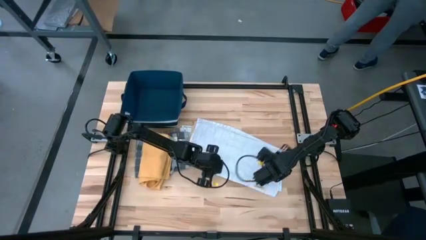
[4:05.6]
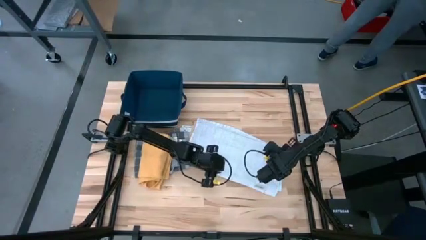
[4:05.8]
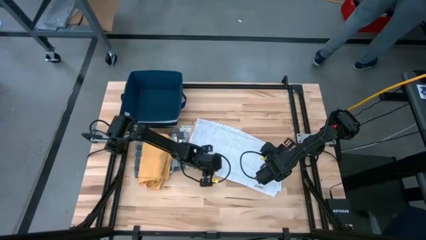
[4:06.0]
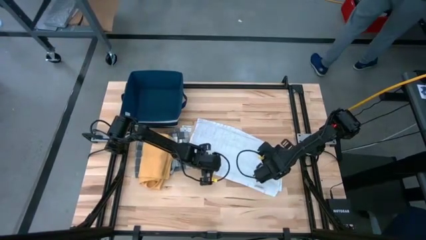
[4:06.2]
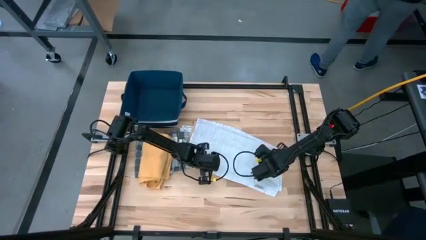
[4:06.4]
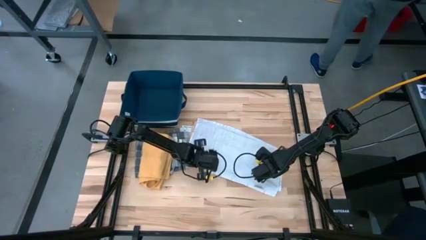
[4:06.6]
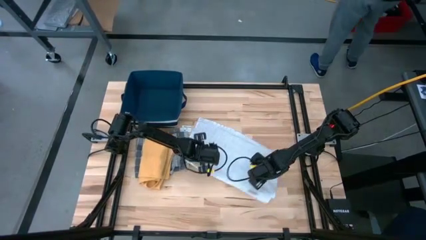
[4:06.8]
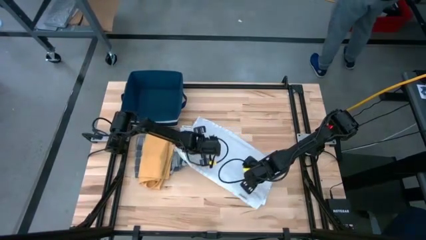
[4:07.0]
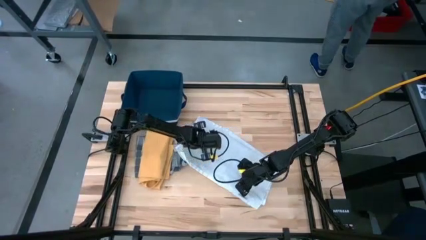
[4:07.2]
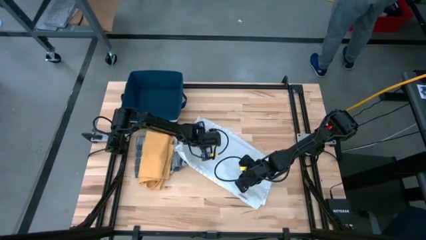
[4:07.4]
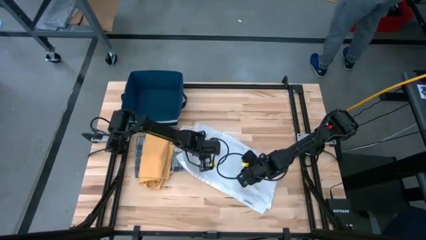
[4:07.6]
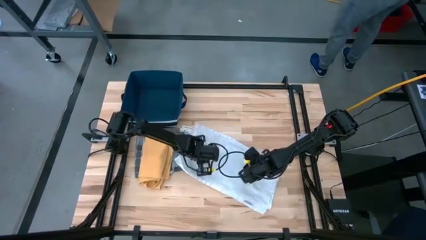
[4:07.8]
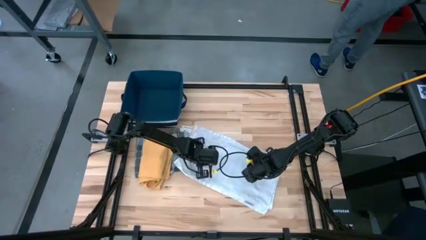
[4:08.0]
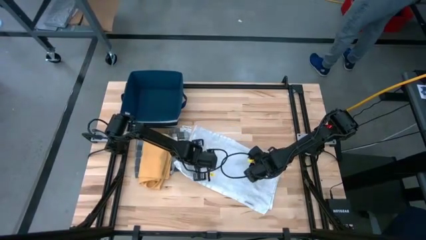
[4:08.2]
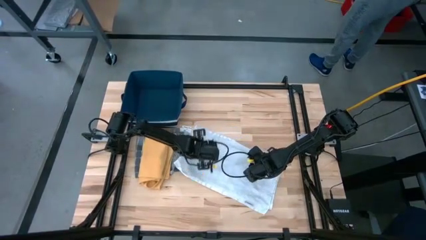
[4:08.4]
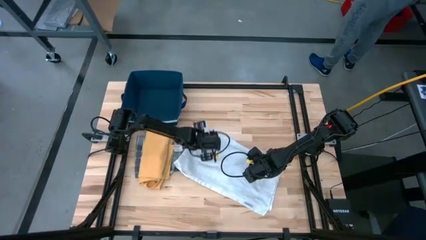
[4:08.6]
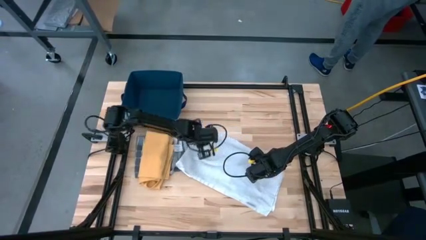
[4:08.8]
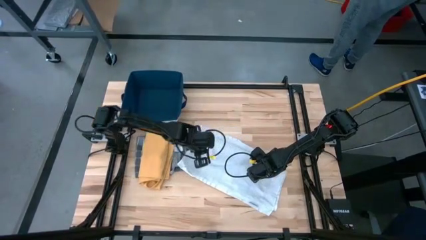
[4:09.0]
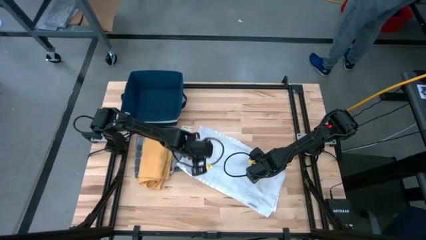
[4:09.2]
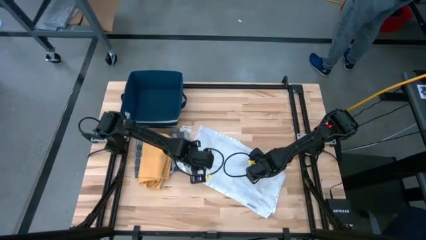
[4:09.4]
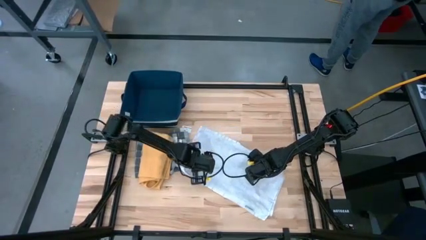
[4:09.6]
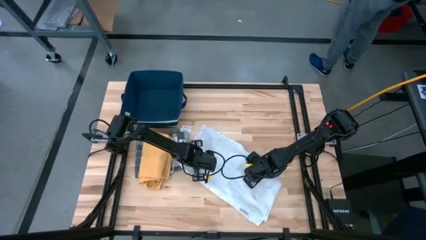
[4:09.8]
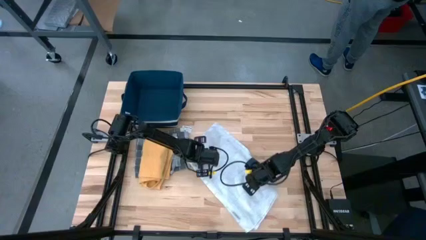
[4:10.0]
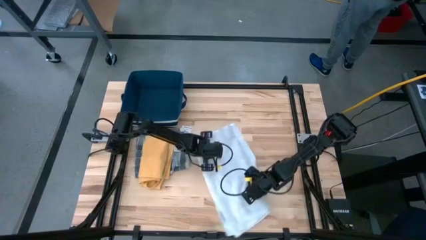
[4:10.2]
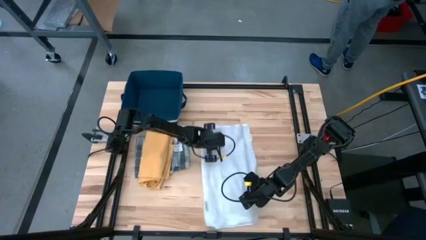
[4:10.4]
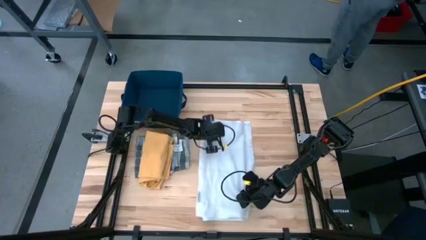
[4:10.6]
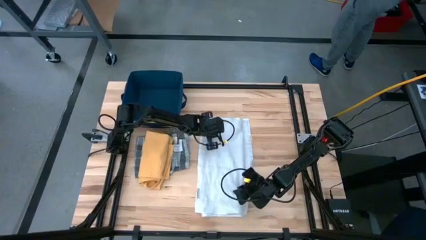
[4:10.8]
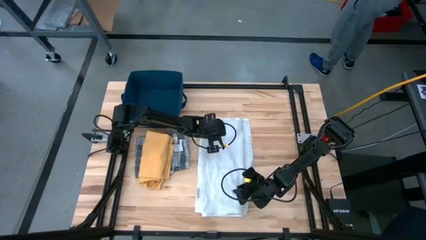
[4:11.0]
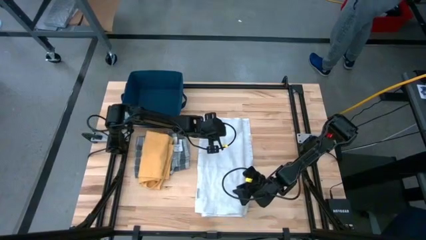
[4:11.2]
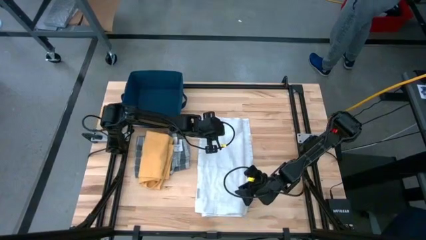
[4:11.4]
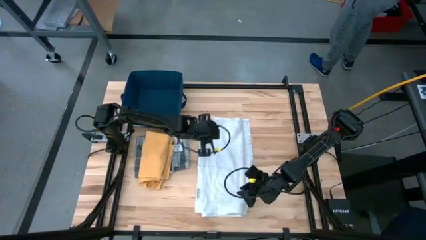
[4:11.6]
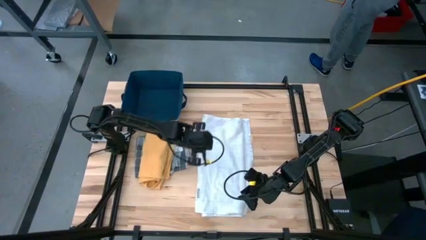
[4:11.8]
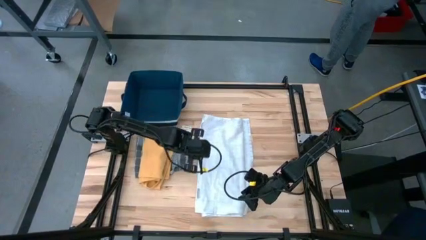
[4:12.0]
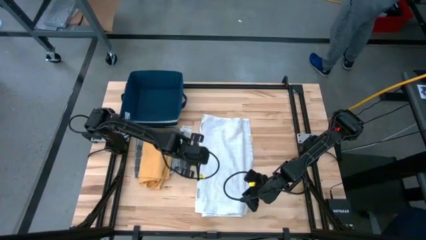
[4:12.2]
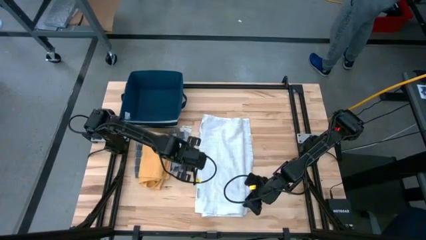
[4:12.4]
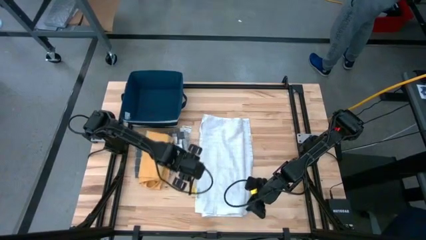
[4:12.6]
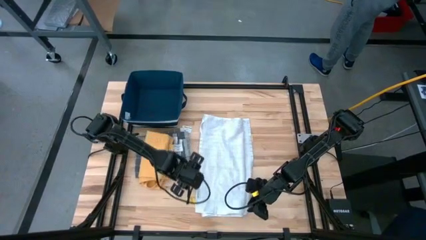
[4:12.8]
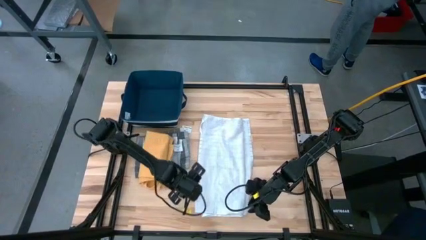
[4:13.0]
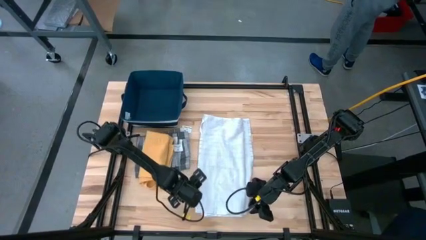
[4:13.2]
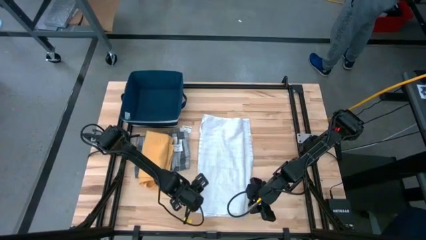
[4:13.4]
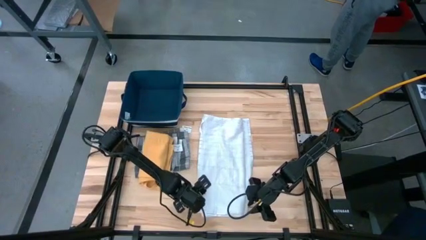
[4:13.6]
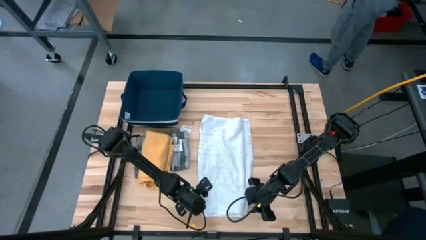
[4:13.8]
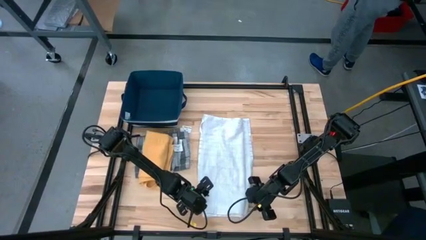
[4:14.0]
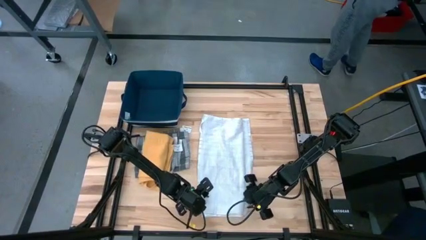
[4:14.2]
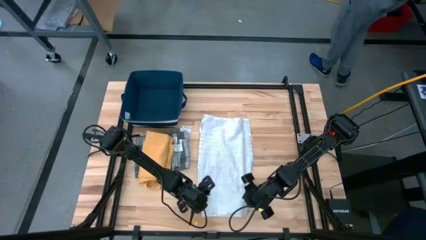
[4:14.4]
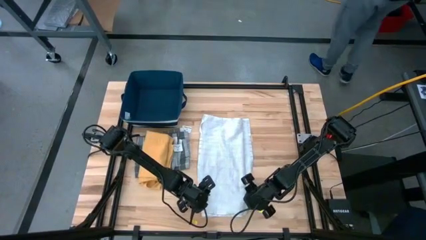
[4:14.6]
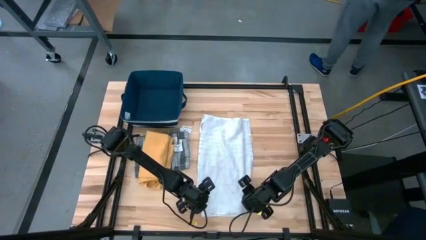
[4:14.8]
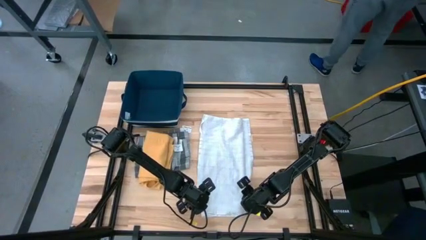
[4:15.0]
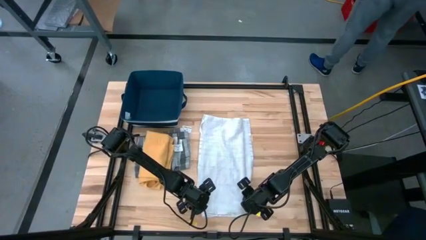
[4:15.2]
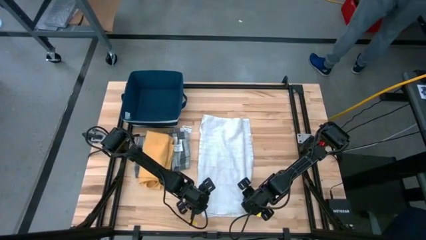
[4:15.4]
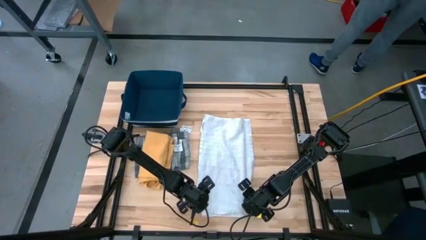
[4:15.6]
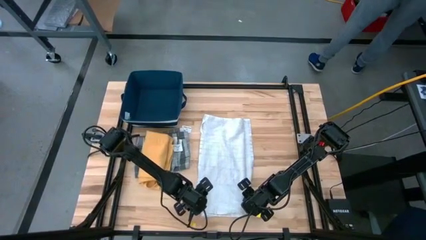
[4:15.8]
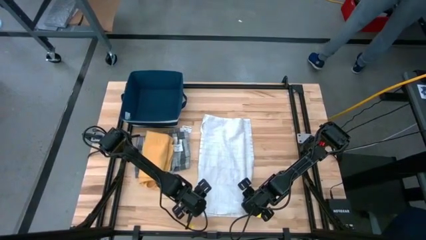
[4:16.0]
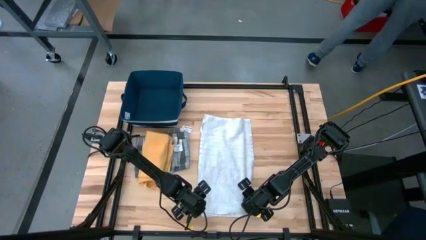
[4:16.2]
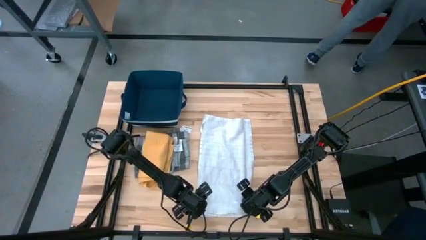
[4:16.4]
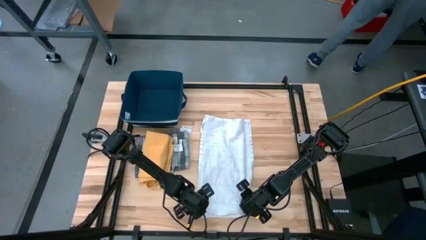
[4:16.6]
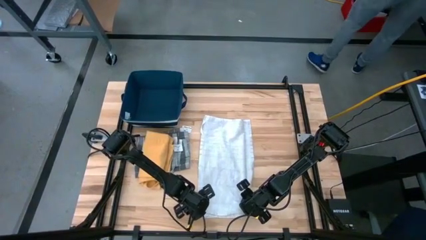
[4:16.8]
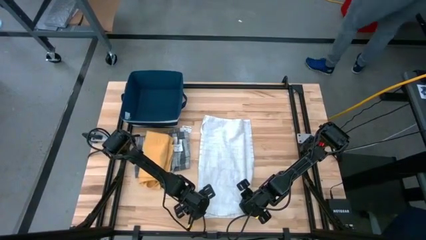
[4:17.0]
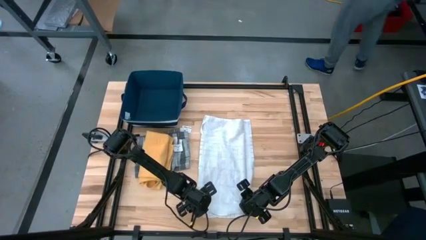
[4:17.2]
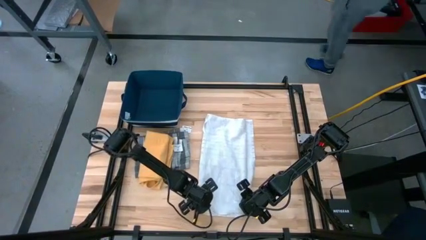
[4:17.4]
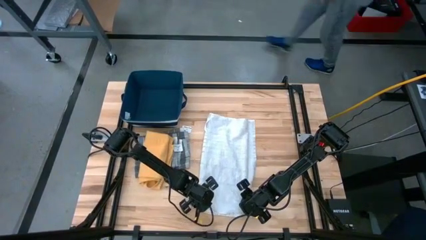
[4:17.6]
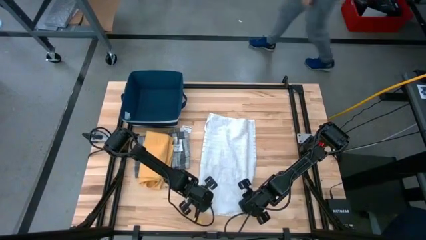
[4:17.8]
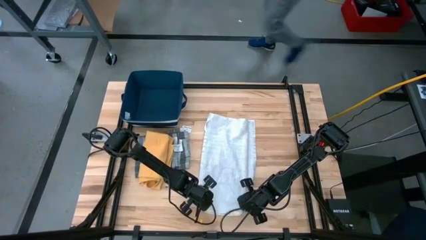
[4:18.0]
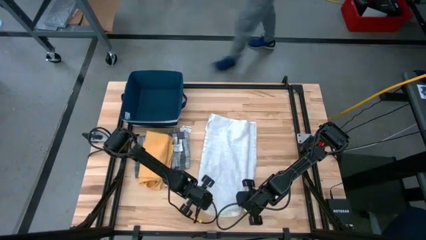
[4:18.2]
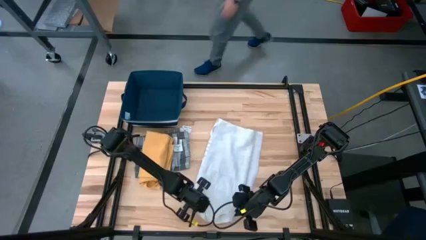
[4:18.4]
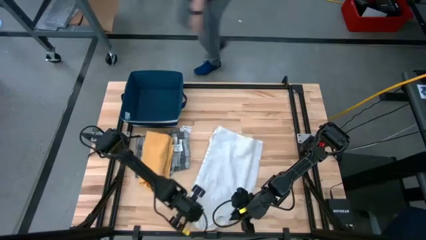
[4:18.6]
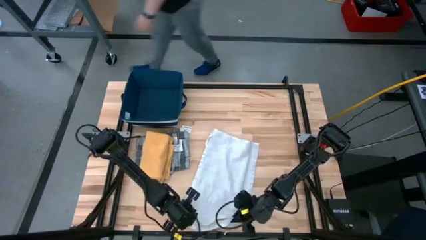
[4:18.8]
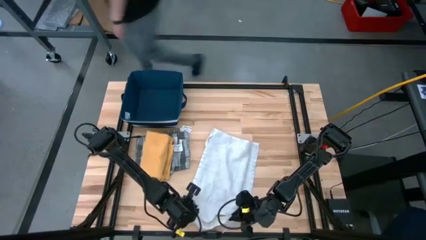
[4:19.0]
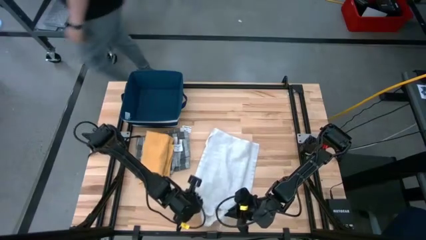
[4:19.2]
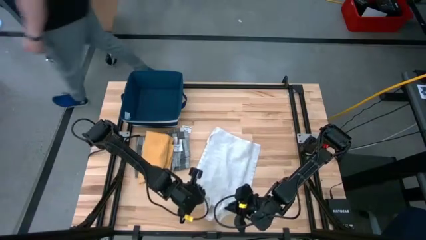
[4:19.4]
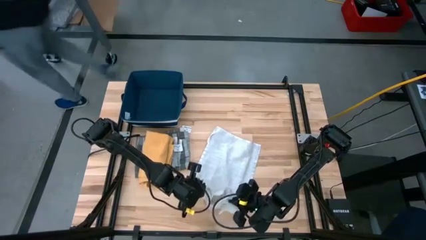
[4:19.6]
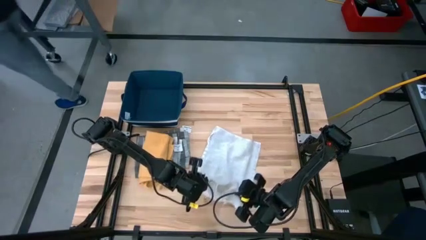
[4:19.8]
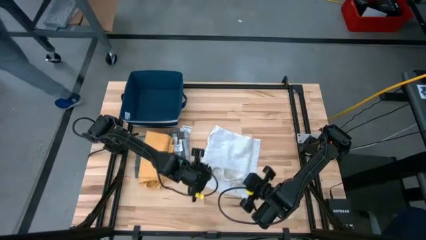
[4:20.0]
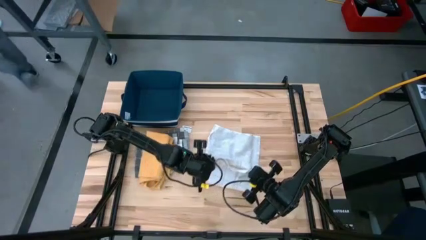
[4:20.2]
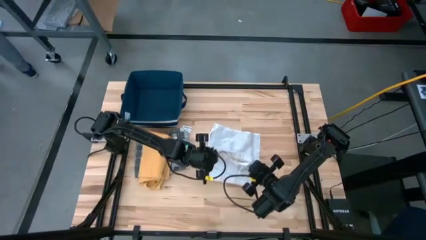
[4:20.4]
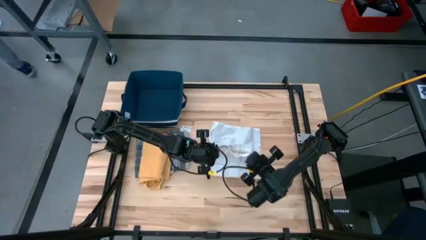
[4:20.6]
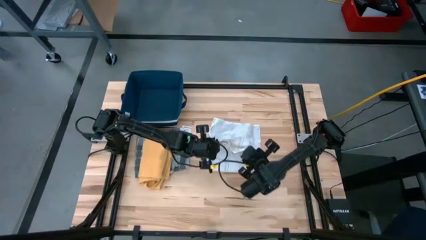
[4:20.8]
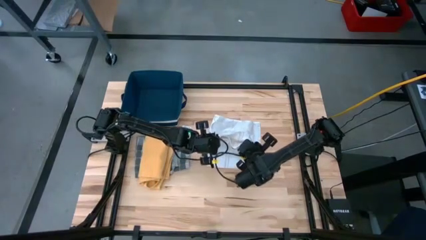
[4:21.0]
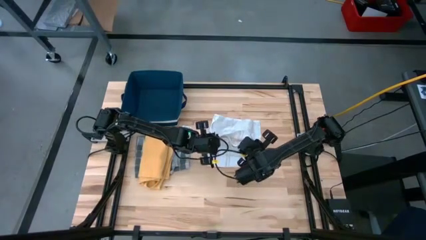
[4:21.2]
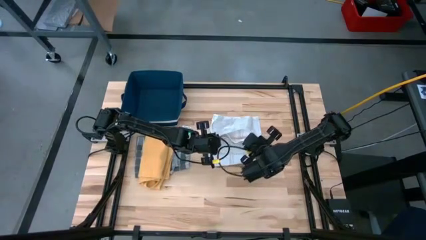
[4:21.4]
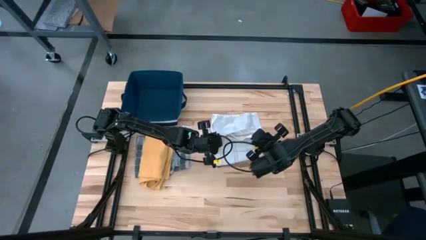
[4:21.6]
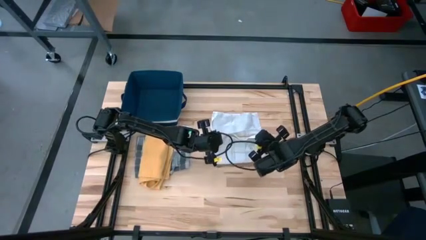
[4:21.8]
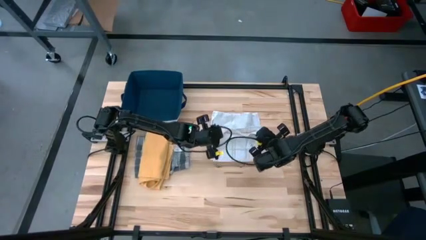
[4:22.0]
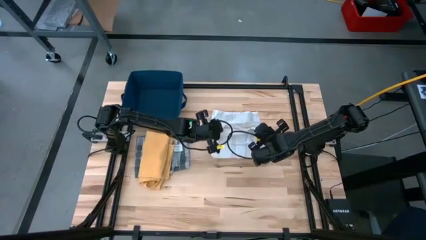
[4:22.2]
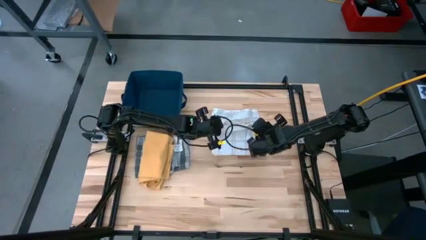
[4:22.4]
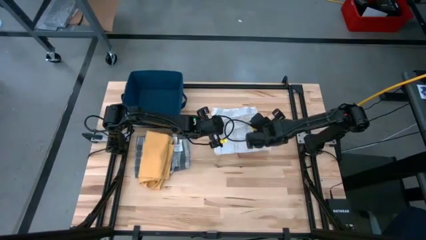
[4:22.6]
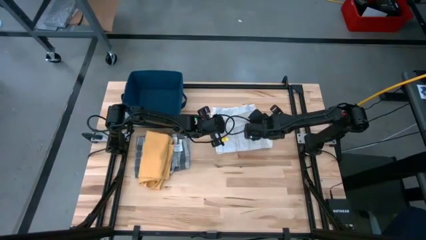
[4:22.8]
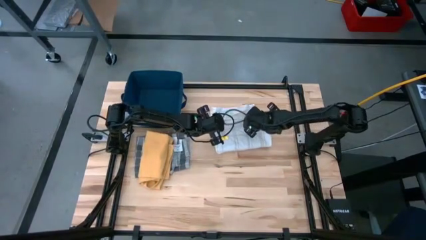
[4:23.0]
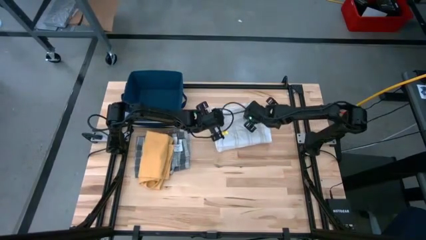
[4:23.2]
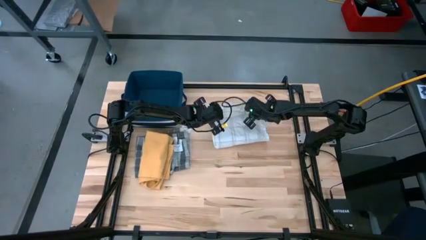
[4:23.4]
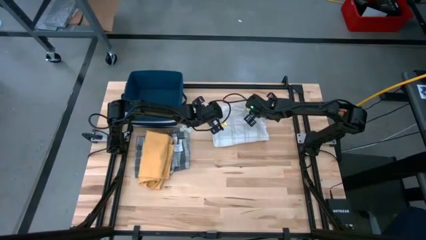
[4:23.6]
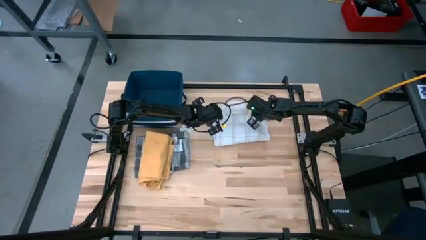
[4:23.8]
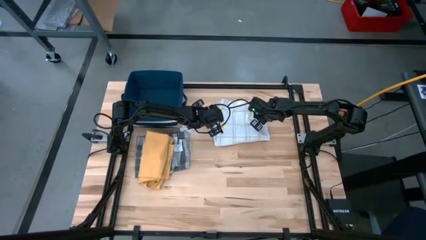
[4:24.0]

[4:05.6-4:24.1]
Task: Fold towel
Fold the white towel
